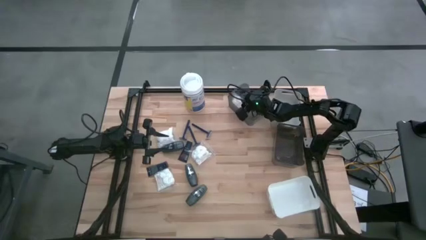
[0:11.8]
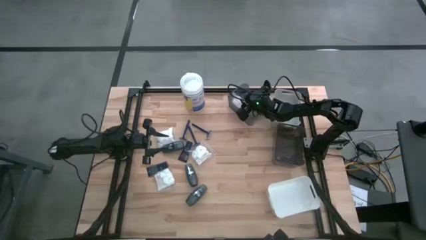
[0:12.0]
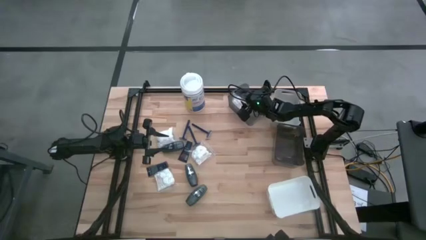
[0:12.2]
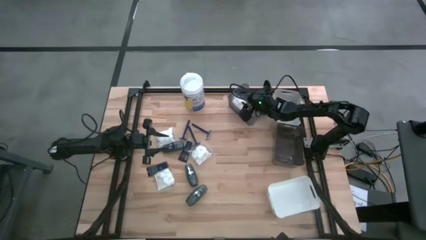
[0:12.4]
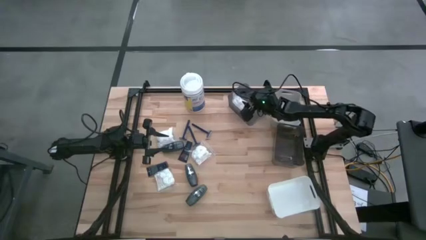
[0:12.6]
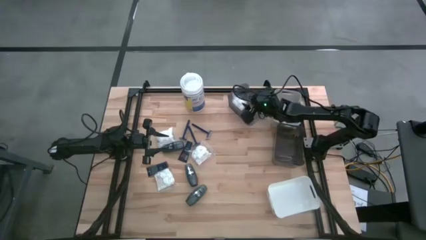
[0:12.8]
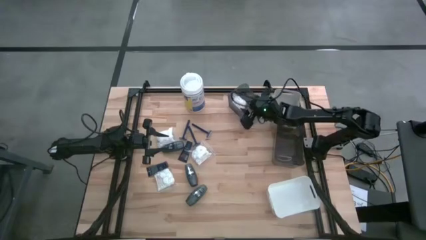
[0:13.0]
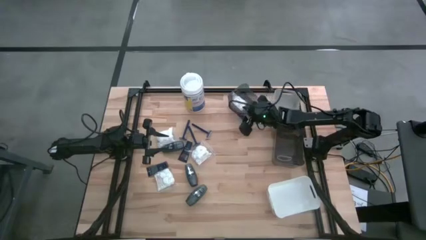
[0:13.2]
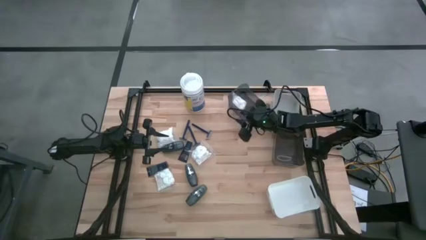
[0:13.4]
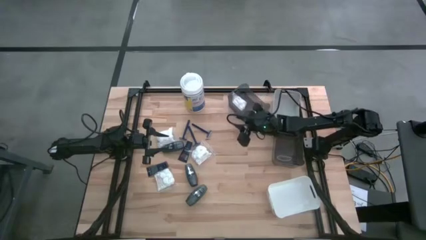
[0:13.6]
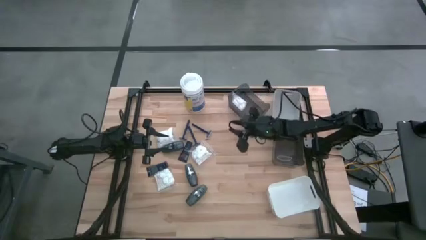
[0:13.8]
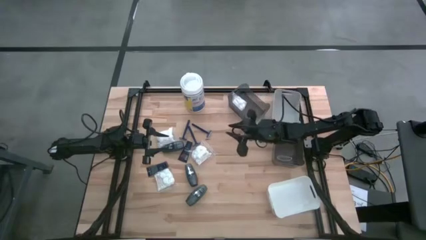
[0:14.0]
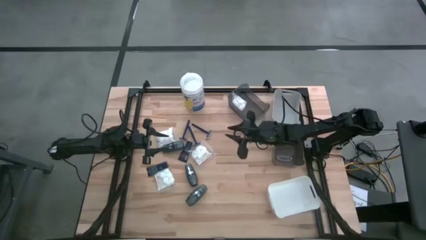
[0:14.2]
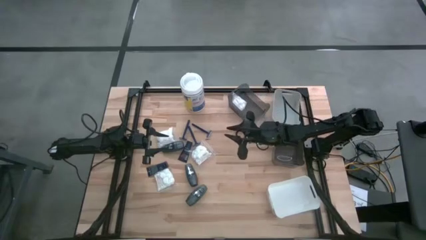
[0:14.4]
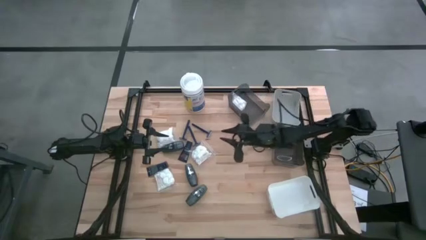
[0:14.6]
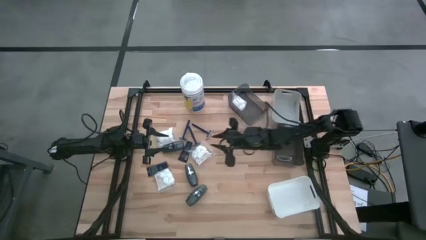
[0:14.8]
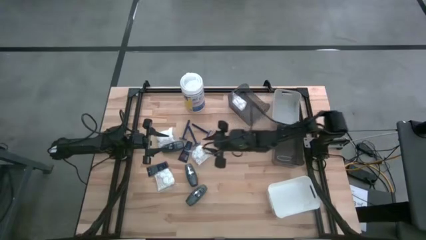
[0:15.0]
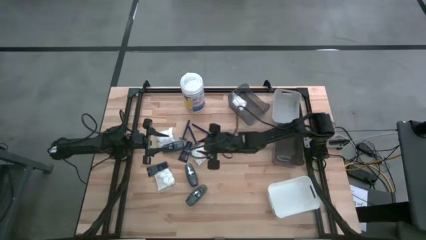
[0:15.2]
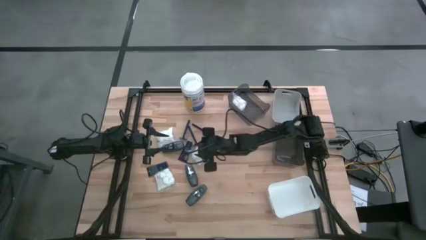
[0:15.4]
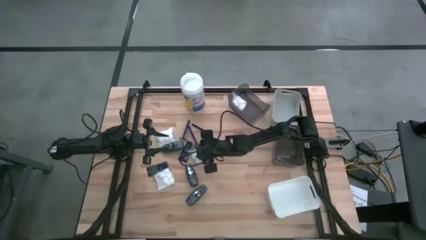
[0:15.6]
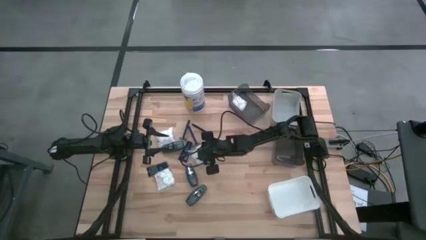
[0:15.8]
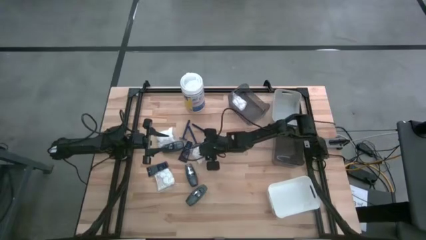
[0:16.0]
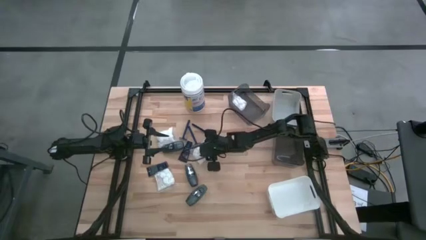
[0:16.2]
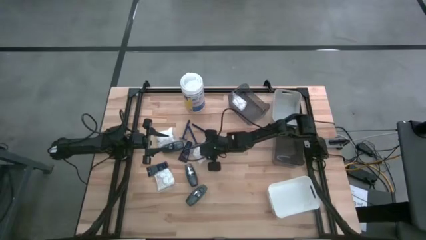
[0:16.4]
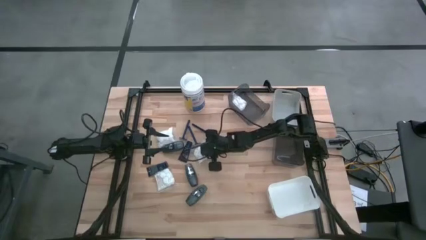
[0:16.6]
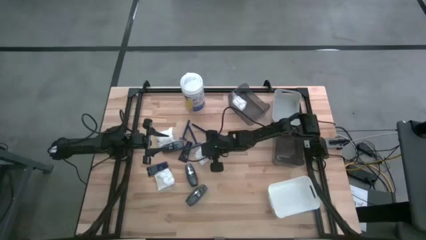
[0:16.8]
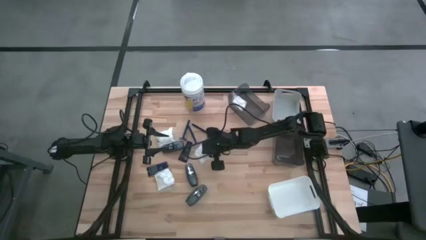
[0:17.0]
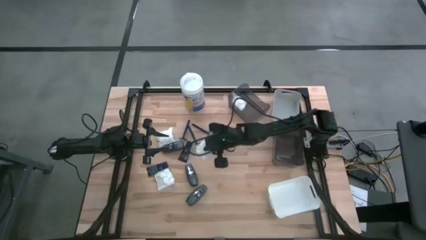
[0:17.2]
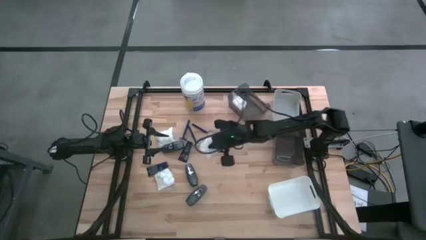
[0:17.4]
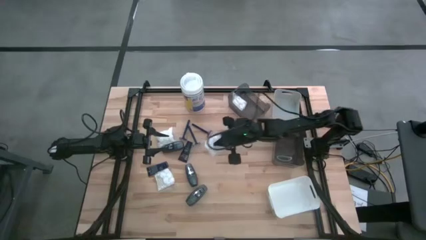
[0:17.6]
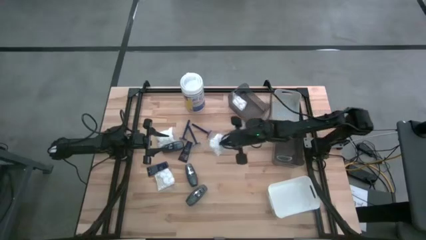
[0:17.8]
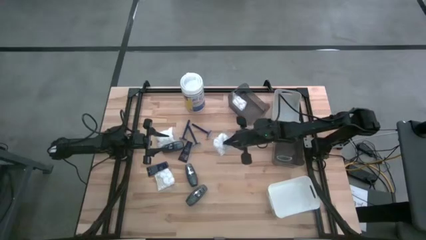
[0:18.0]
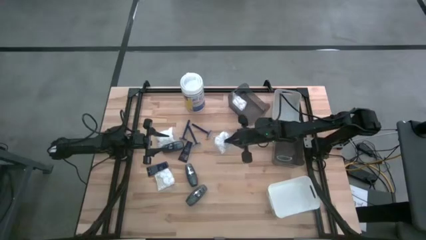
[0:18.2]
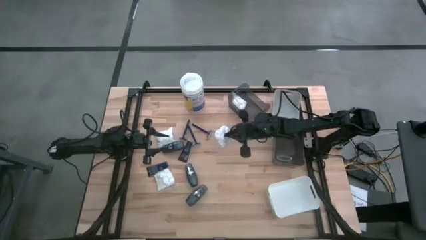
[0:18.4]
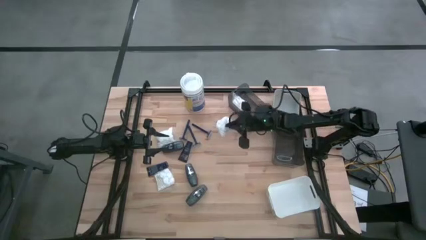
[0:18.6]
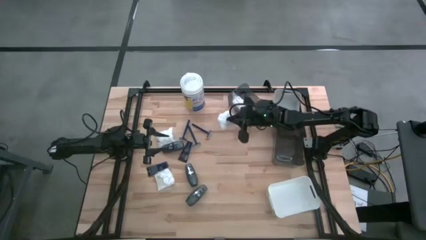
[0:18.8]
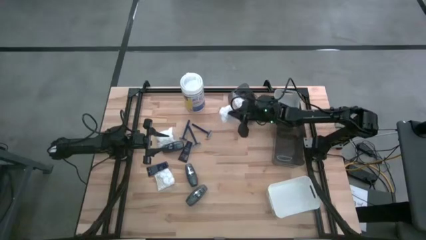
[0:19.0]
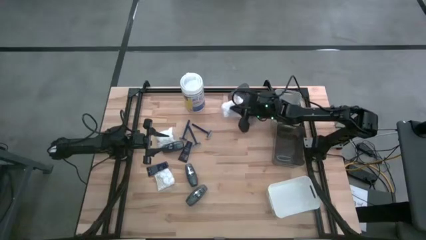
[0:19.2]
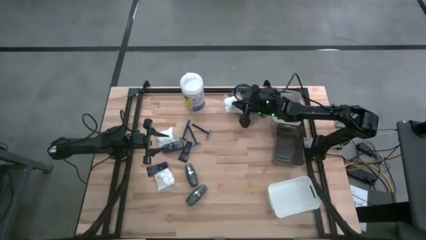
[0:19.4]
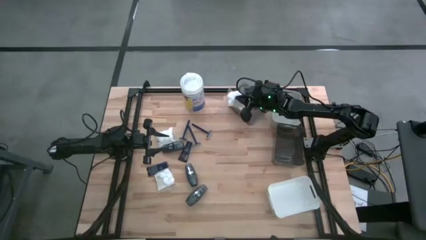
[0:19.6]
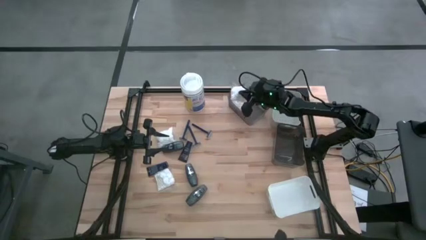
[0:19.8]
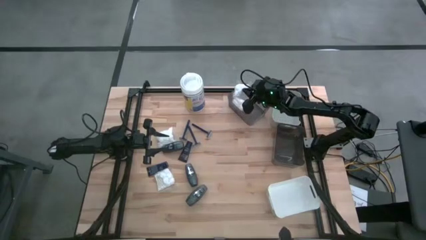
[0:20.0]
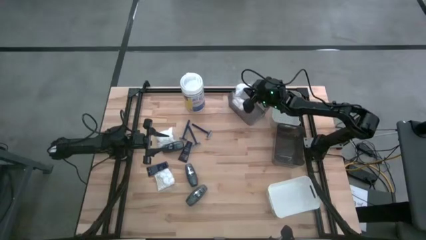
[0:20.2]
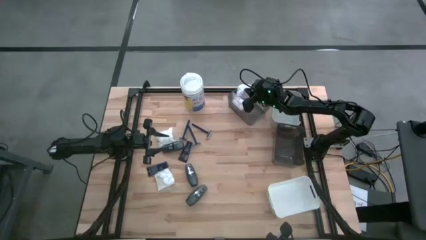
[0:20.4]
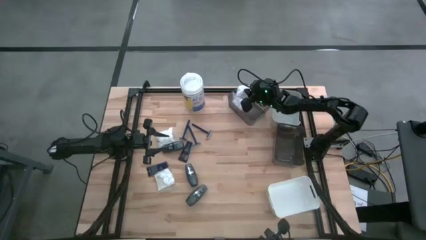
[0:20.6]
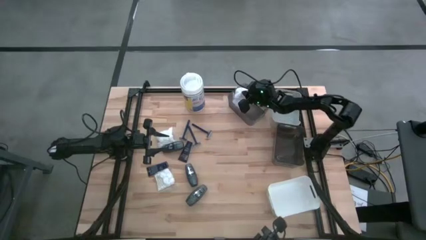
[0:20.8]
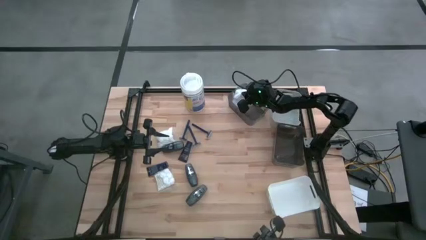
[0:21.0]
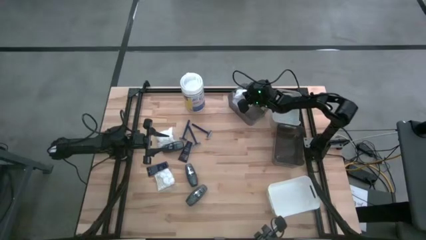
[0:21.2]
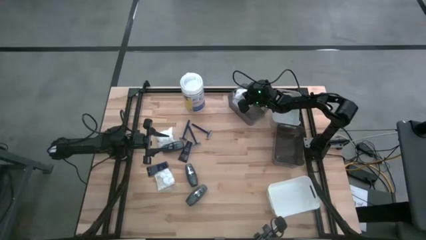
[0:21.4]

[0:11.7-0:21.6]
Task: Pick & Place Travel size toiletries
Put the middle white cotton pack into the top black bin

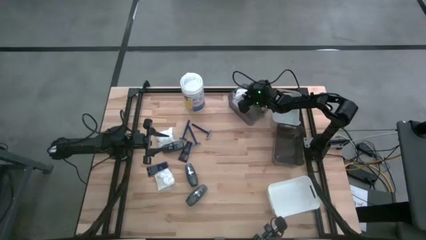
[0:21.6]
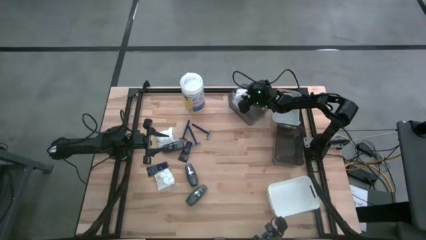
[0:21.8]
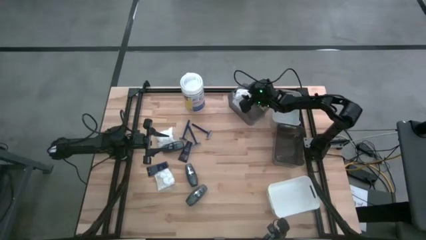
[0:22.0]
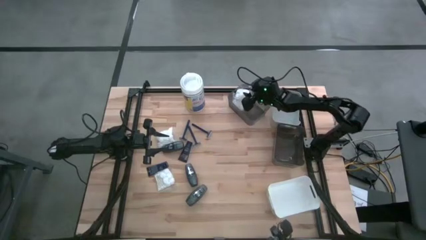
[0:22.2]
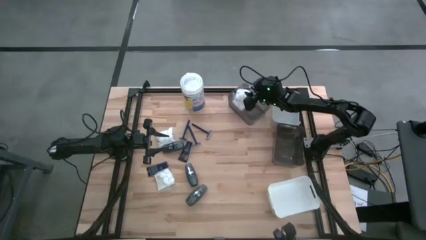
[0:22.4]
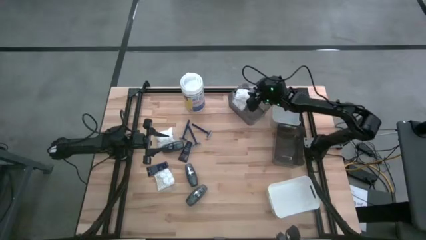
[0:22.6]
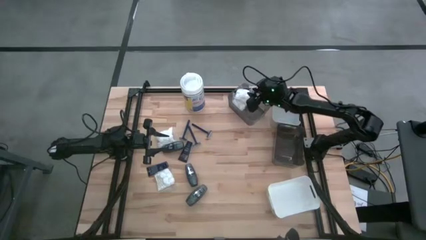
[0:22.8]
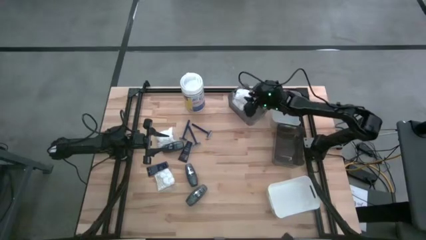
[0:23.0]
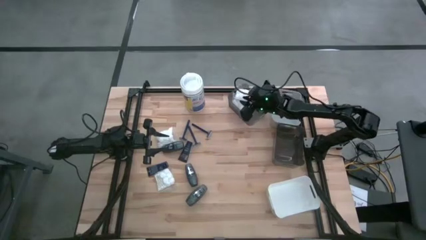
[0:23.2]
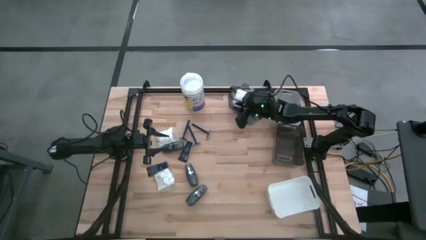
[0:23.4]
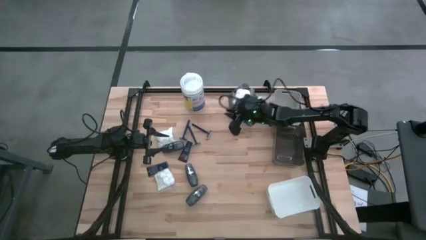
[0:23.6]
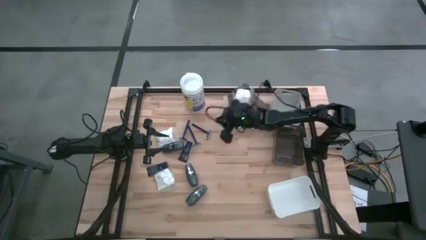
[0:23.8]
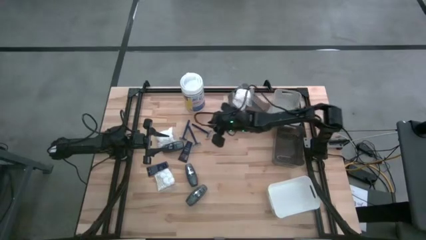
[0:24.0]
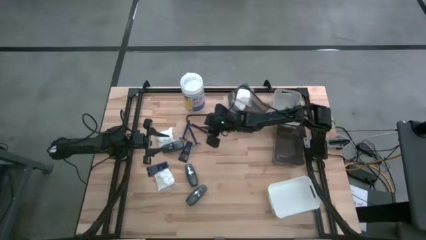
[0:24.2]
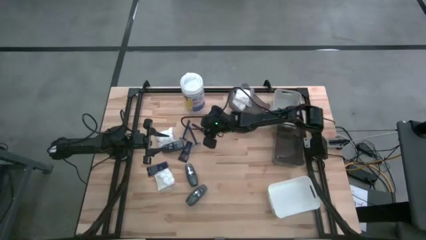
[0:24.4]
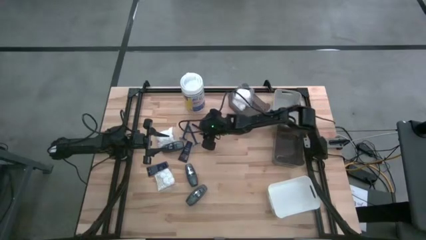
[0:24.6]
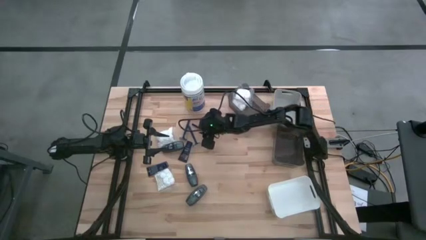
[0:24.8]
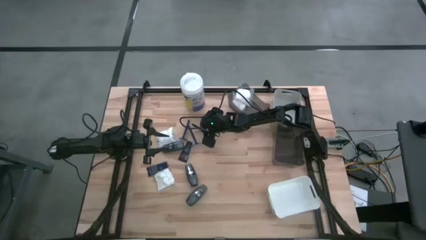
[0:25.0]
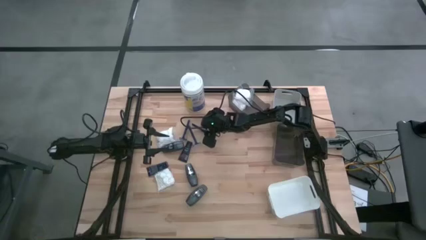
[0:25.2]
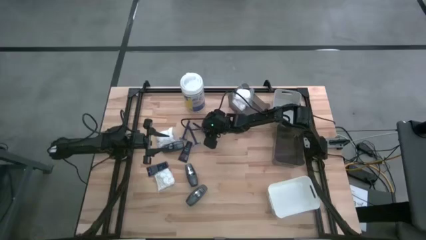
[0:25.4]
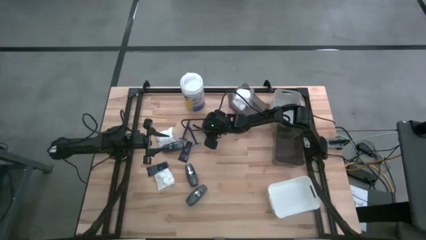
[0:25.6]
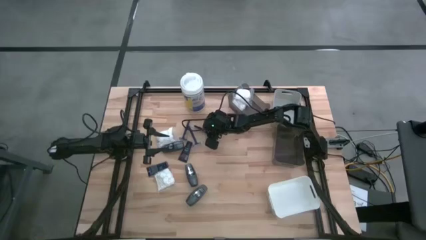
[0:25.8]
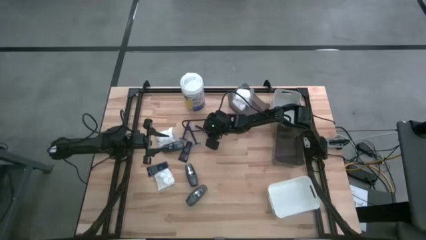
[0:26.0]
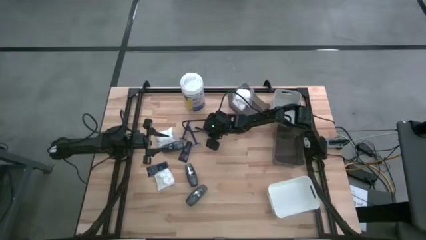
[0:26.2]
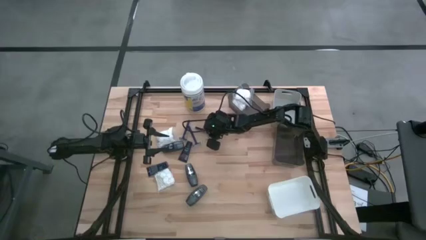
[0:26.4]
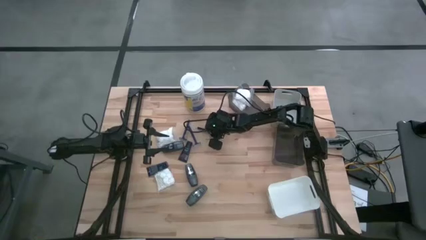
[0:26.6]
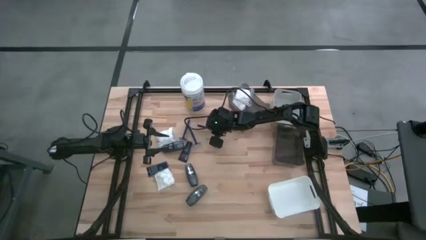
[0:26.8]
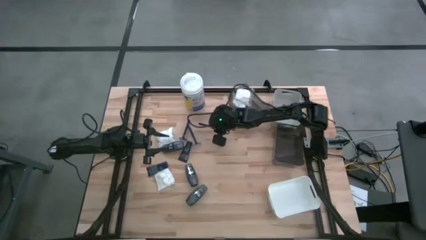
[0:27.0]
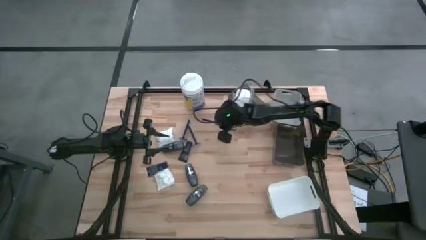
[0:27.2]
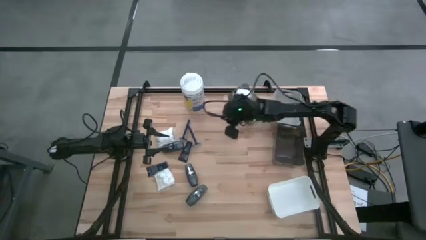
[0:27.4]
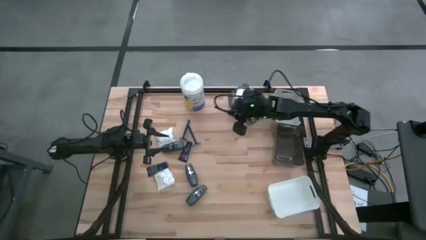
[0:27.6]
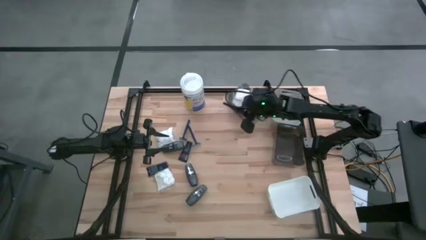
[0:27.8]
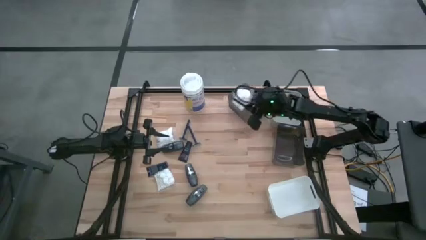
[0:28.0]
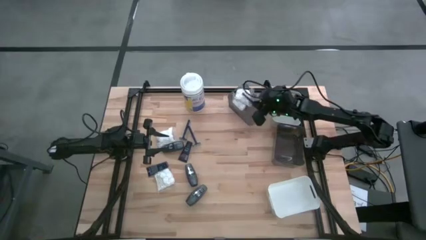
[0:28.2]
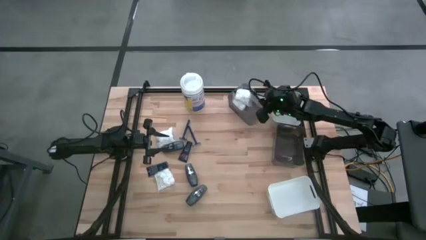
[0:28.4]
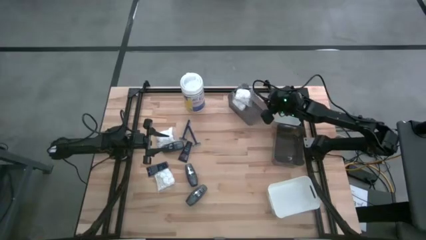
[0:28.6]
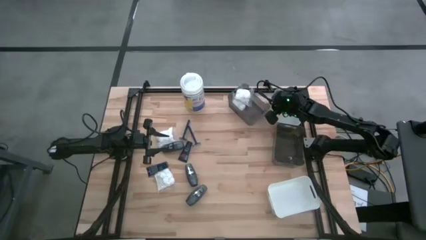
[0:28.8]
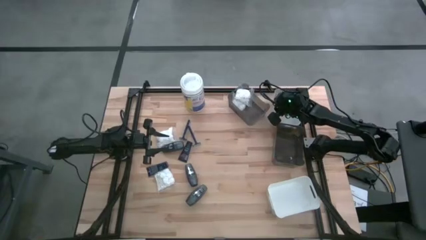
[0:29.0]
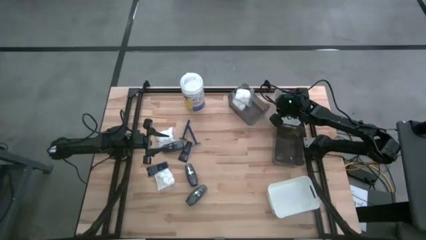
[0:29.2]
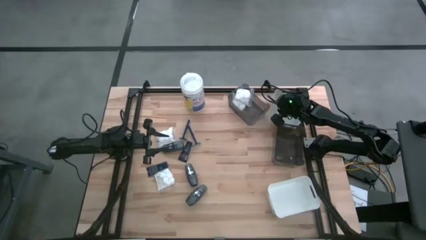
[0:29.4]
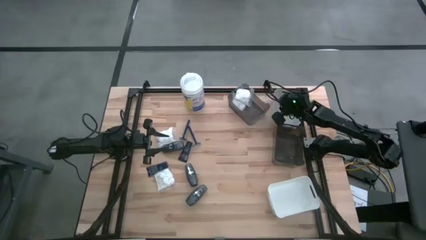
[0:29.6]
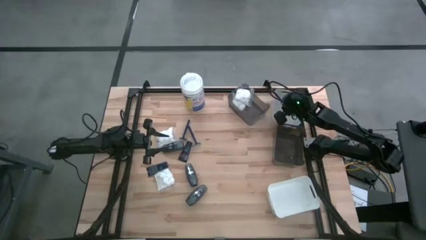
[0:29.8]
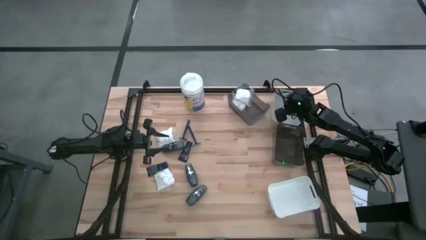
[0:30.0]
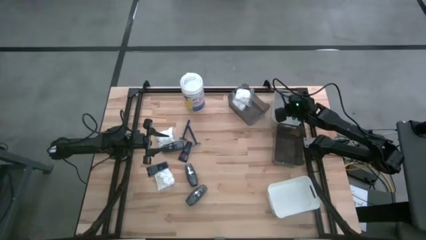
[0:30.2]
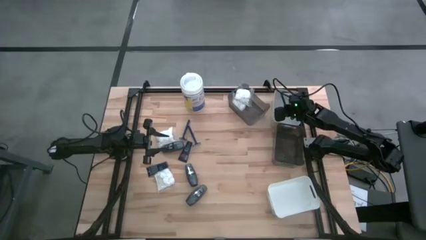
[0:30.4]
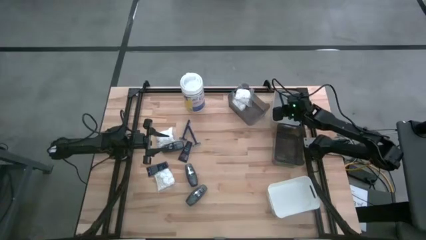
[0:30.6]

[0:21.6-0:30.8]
Put the right blue razor into the gray bin
